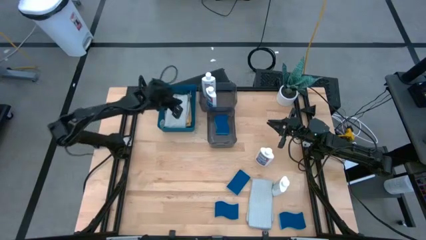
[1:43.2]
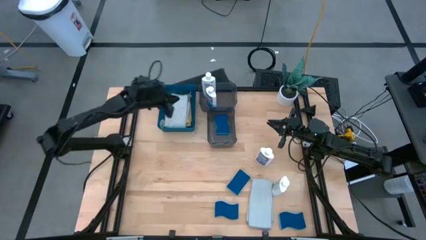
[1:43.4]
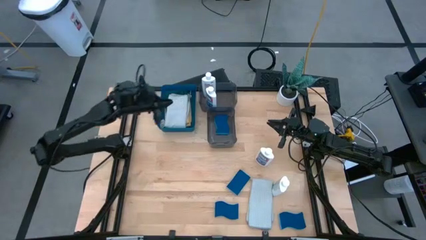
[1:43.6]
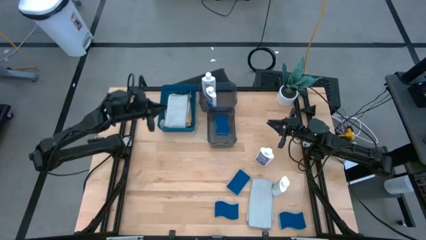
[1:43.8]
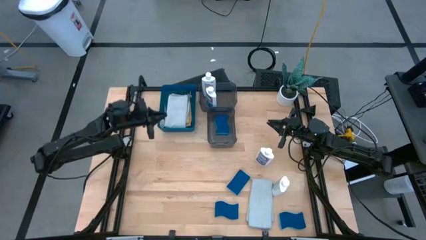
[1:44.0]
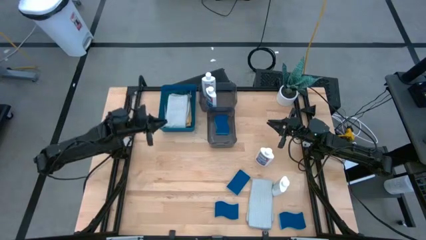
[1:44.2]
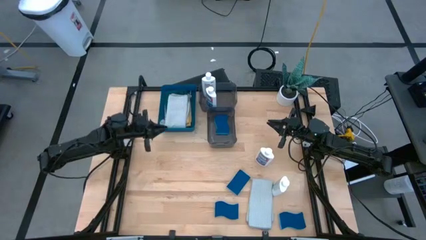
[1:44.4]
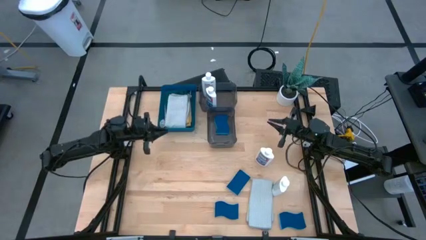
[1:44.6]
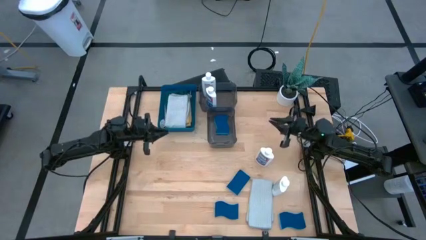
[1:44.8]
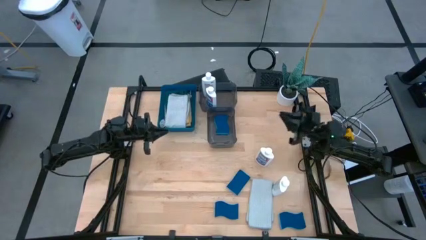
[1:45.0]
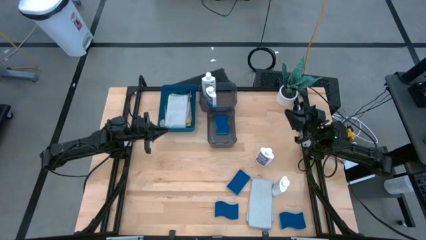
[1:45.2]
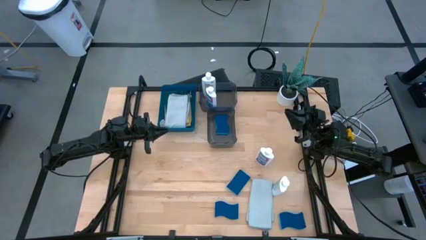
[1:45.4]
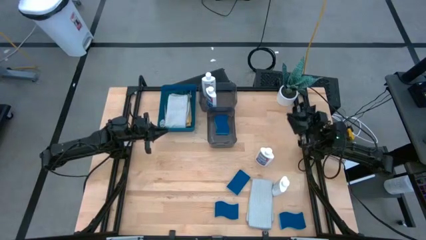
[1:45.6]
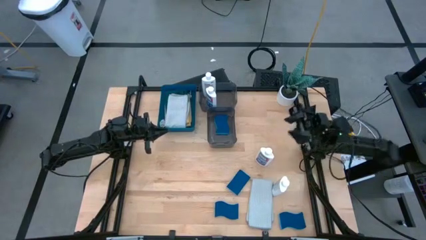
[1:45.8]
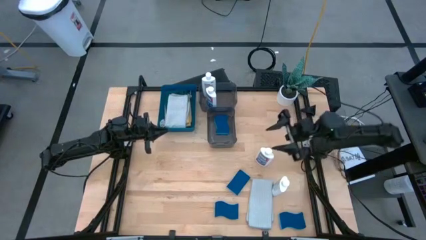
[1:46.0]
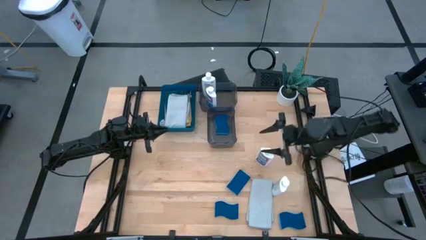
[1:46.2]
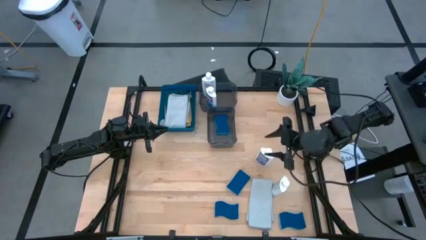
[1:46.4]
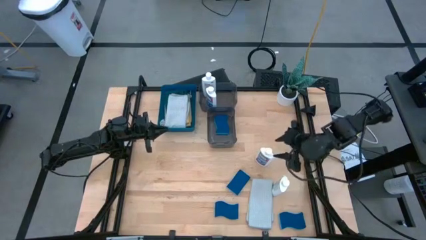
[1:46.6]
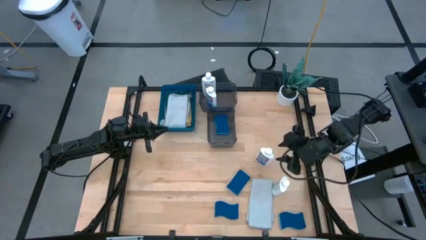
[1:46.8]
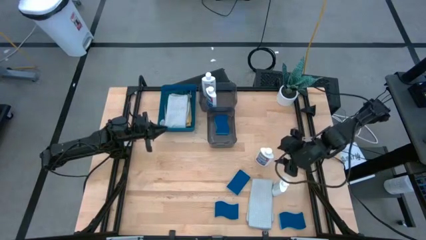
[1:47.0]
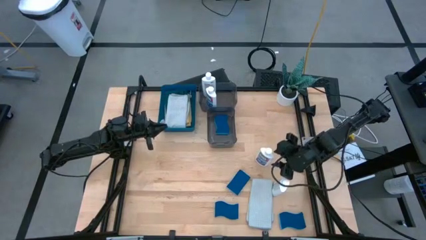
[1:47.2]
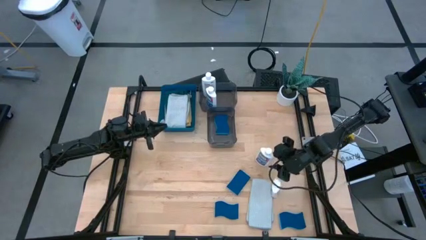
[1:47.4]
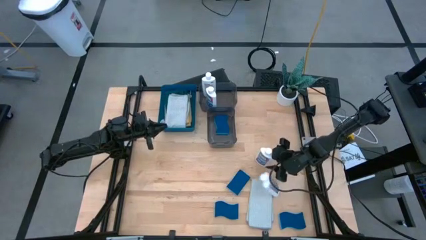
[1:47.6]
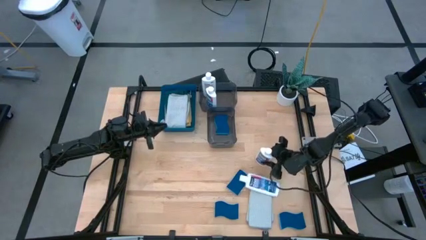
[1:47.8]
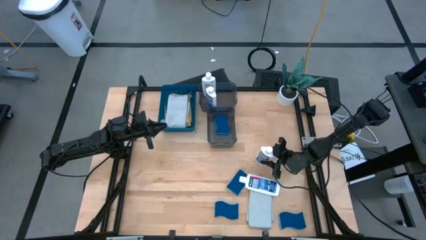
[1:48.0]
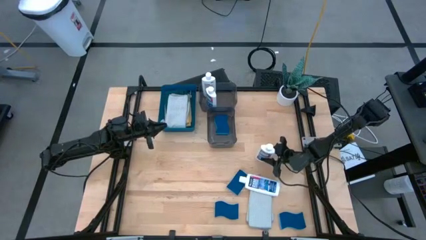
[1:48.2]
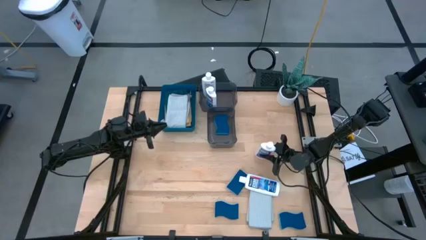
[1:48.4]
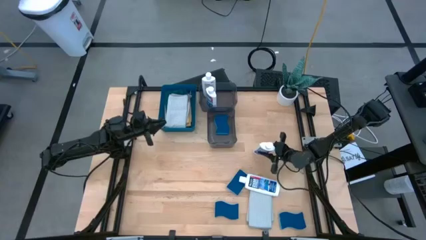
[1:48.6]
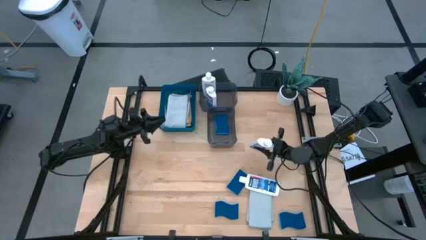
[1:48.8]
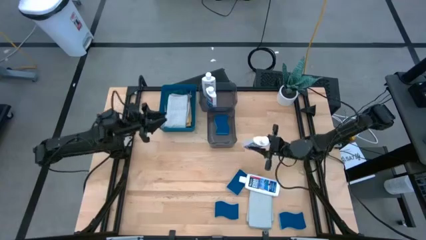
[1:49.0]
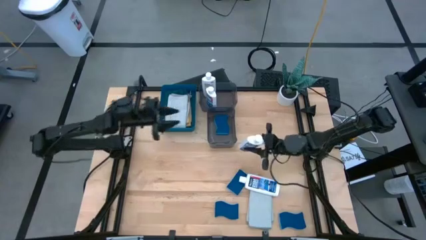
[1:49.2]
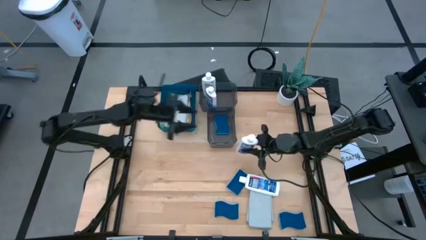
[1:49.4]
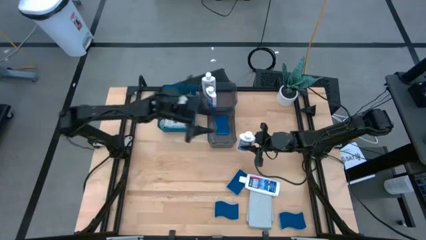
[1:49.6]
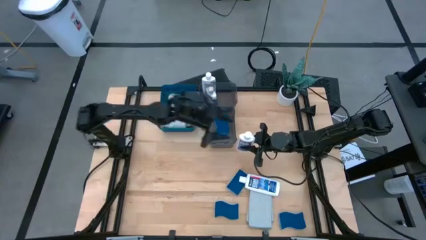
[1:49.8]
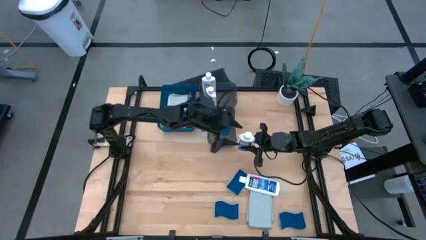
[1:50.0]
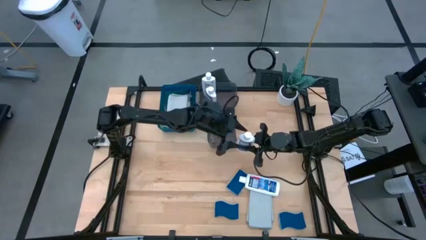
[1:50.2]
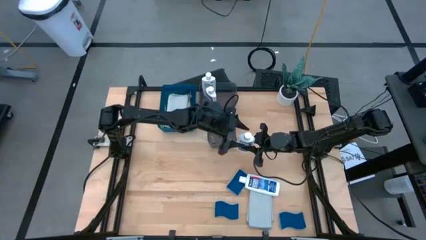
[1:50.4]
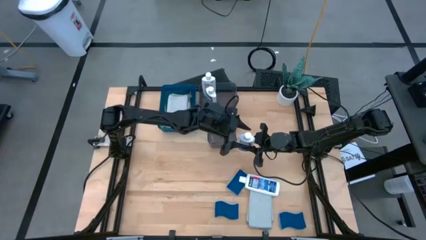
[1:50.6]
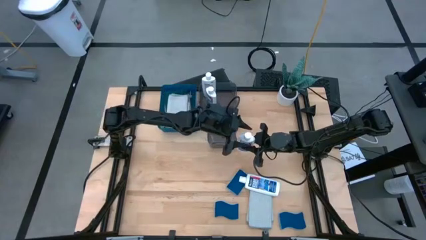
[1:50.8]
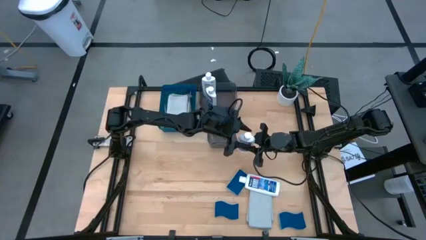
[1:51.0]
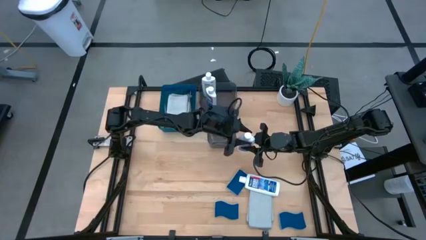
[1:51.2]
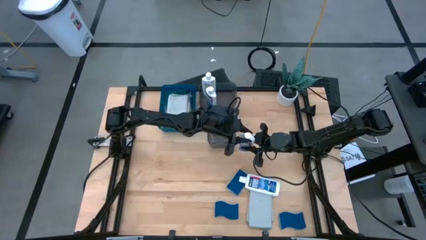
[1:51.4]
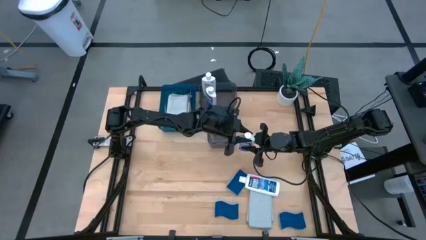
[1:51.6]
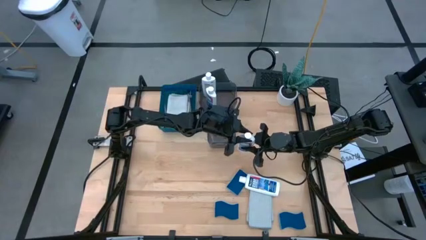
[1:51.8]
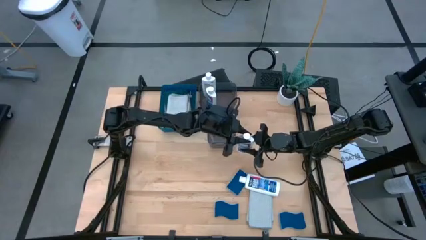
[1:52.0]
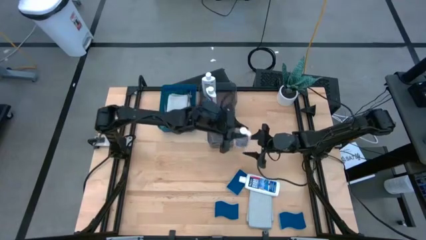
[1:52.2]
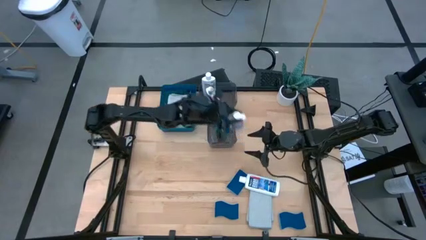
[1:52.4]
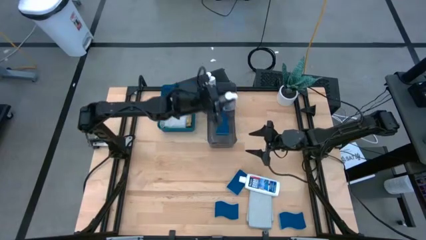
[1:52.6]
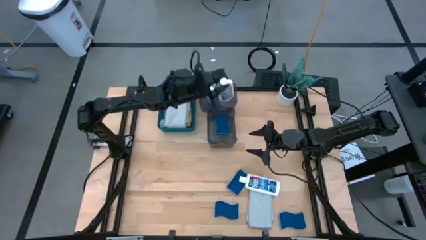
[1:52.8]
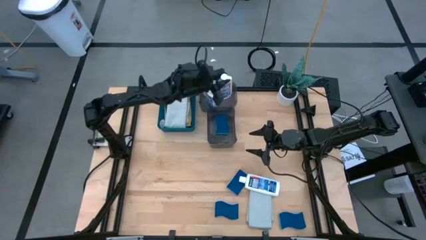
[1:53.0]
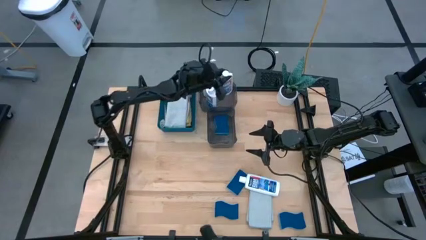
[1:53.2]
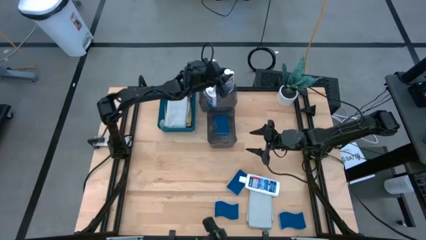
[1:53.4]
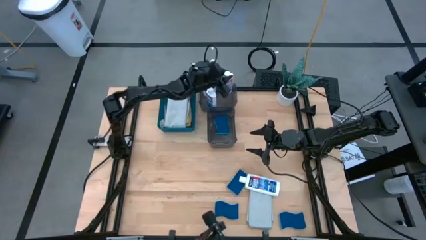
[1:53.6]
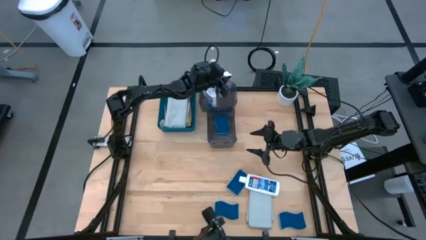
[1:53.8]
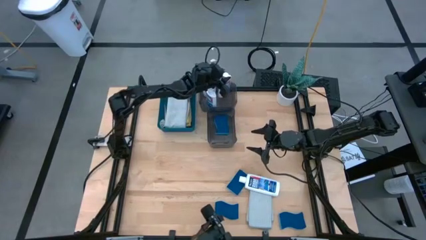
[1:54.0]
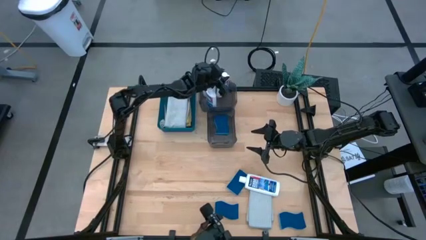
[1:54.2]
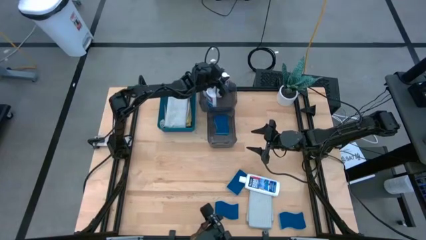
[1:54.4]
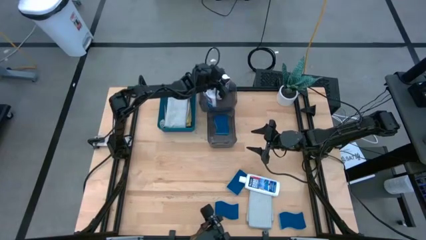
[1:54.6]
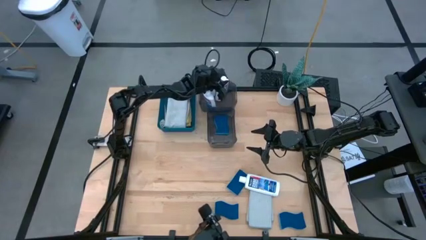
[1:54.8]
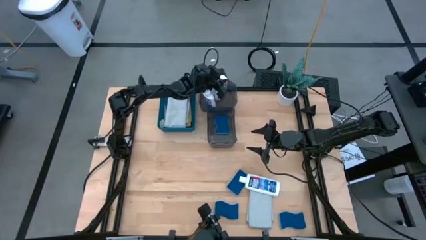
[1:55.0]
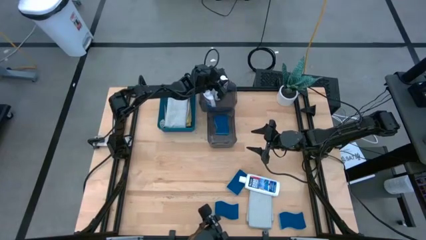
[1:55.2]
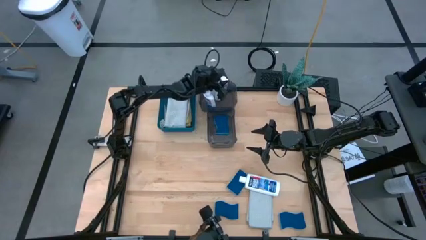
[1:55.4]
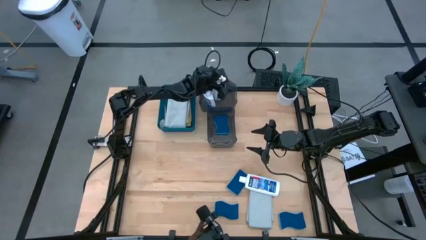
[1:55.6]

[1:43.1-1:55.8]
Task: Pick & Place Kitchen Items
Put the white plastic restorer bottle into the top black bin

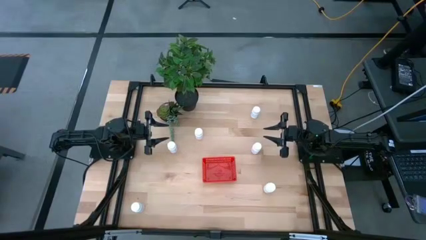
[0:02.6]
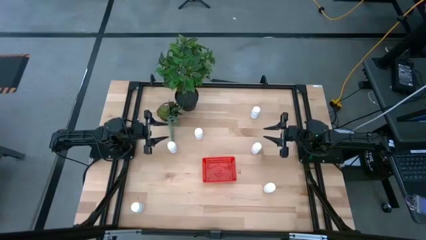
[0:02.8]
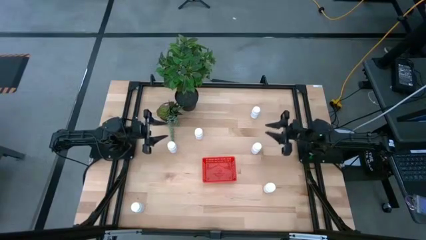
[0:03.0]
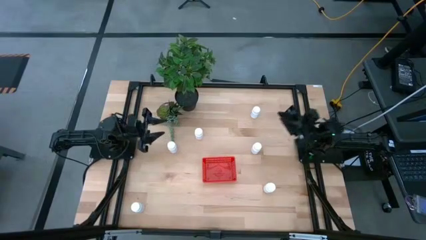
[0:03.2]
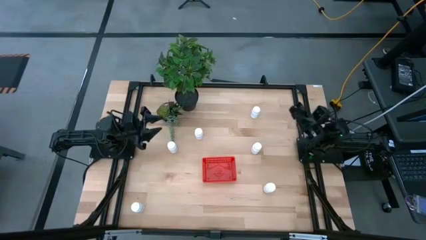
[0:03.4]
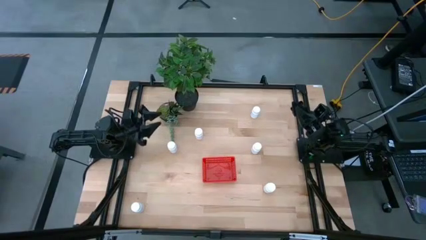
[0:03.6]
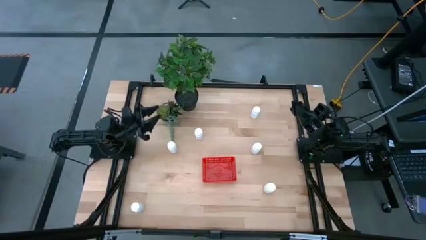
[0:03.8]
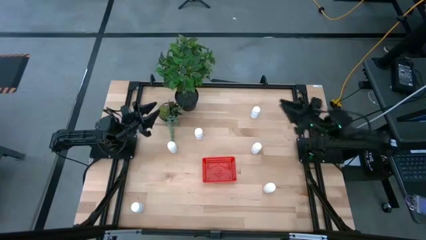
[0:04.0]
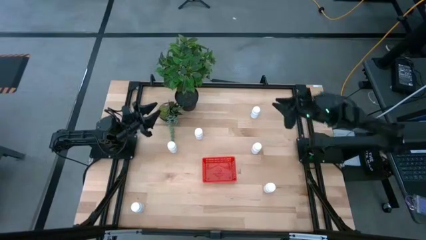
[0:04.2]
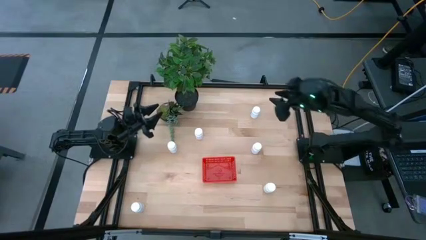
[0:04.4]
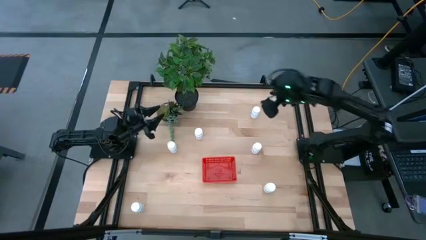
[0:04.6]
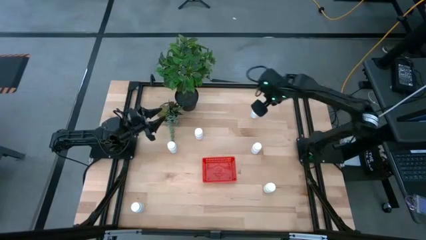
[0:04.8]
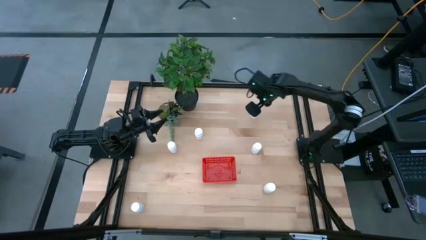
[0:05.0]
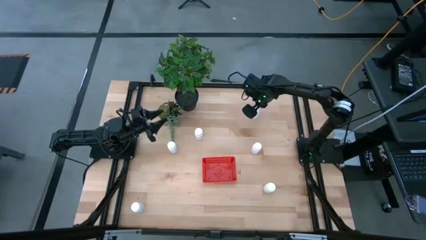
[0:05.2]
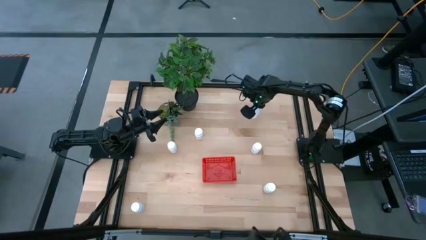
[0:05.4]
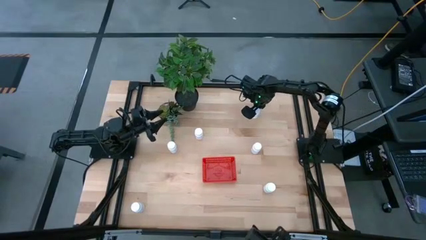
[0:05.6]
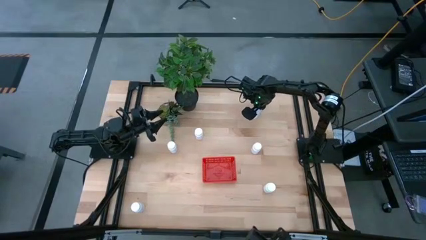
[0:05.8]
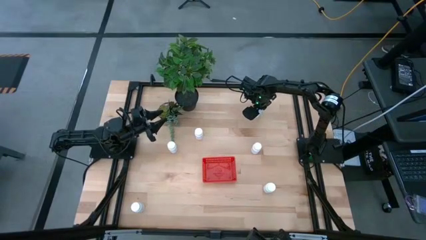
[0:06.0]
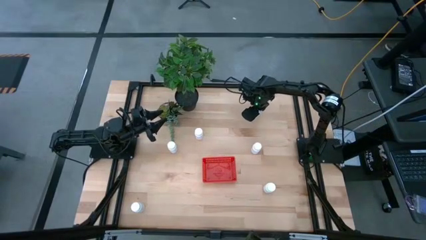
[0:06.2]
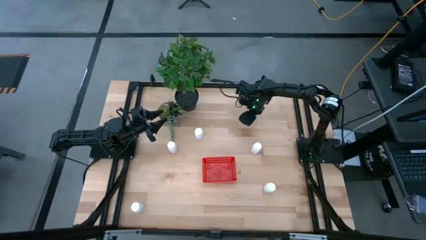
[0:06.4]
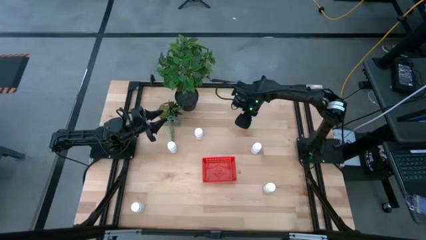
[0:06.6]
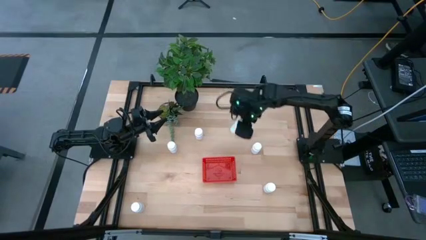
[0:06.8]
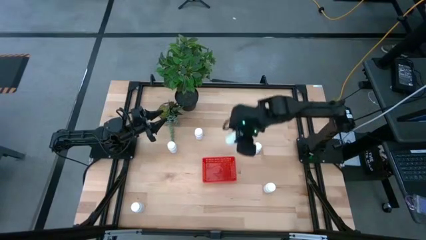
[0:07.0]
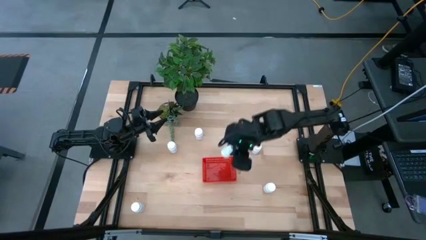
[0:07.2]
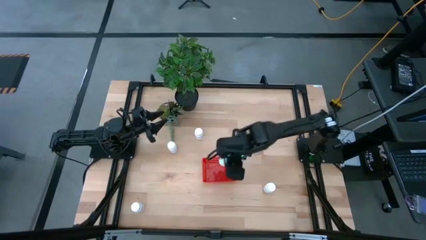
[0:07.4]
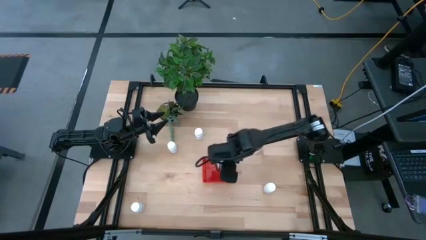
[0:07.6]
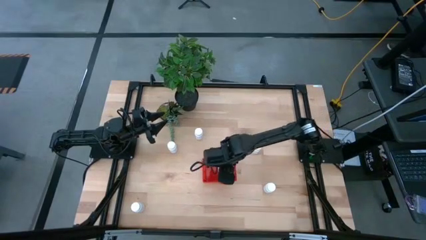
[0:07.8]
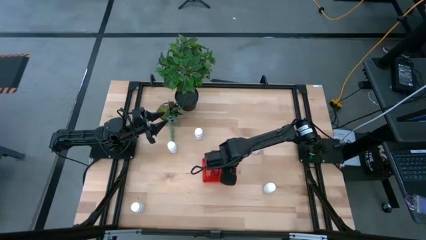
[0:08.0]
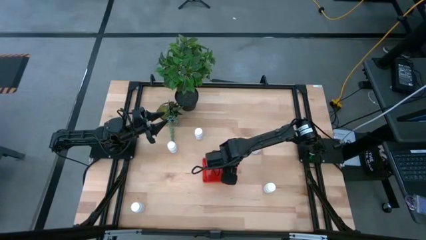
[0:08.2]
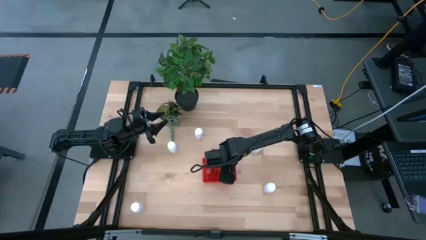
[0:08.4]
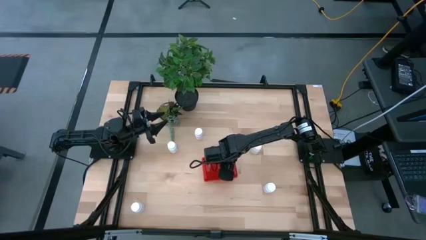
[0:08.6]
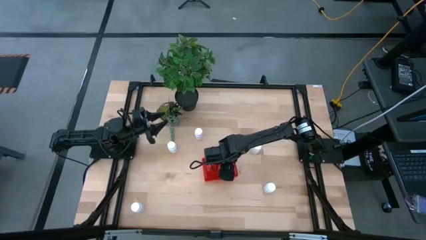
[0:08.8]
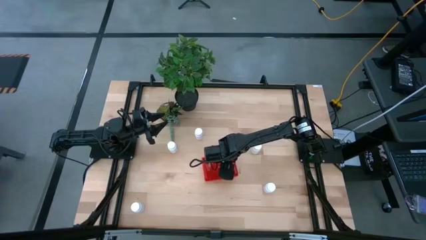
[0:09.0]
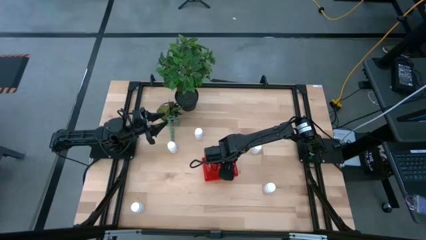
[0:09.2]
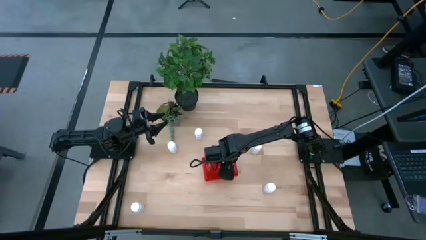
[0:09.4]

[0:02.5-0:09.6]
Task: Pick and place pill bottles into a basket
Put the white pill bottles into the red bin
